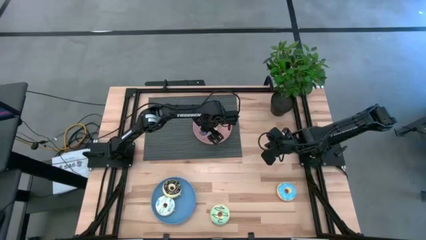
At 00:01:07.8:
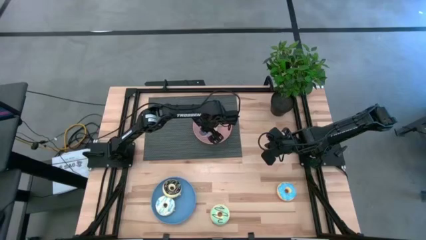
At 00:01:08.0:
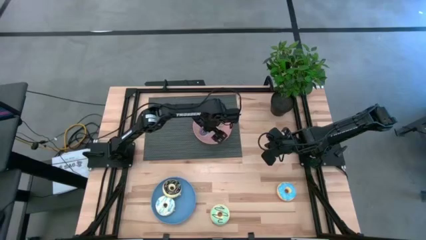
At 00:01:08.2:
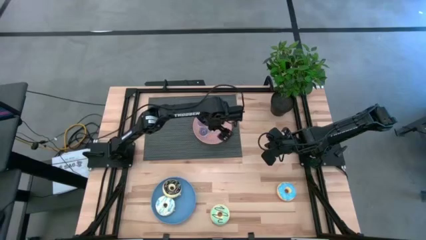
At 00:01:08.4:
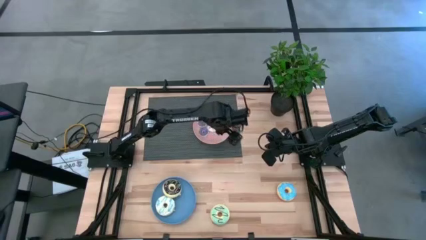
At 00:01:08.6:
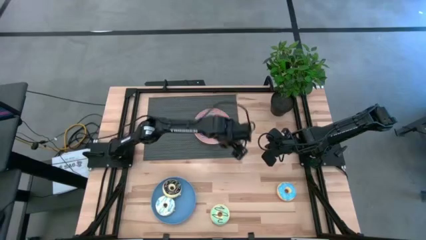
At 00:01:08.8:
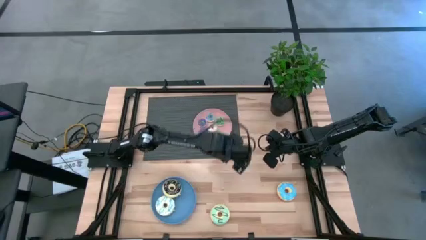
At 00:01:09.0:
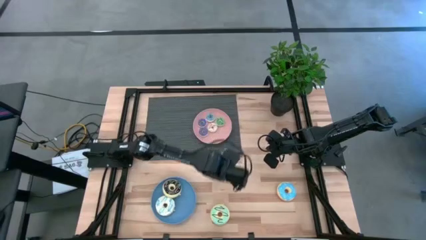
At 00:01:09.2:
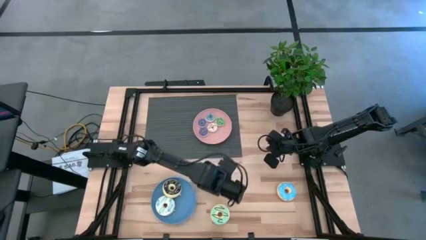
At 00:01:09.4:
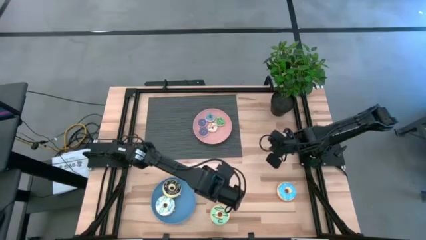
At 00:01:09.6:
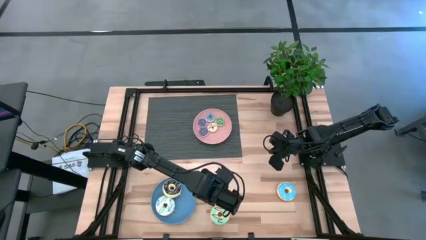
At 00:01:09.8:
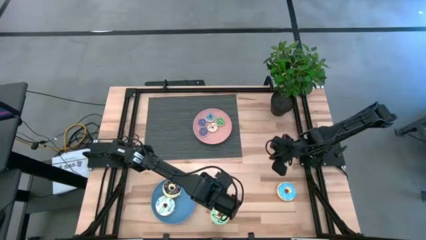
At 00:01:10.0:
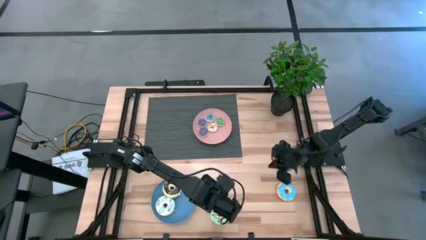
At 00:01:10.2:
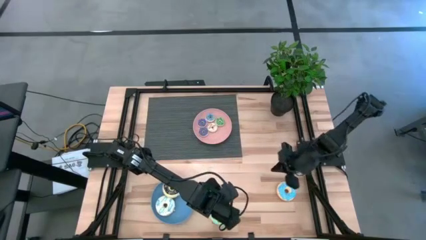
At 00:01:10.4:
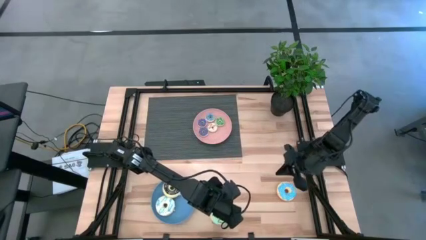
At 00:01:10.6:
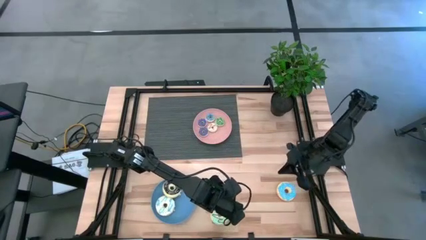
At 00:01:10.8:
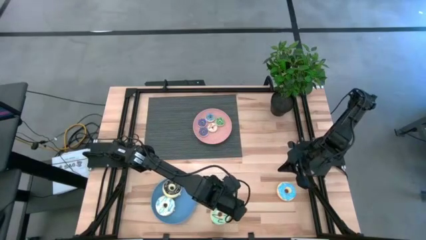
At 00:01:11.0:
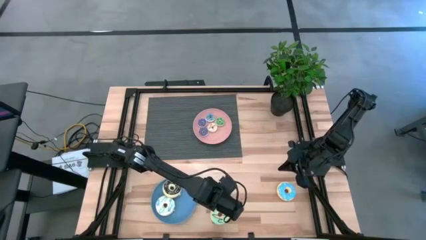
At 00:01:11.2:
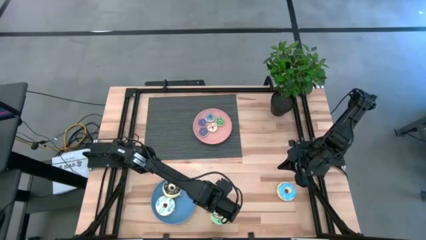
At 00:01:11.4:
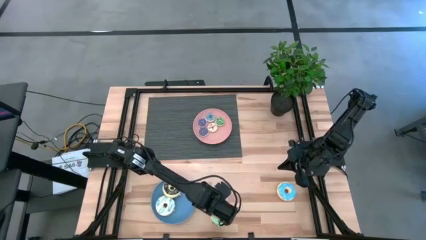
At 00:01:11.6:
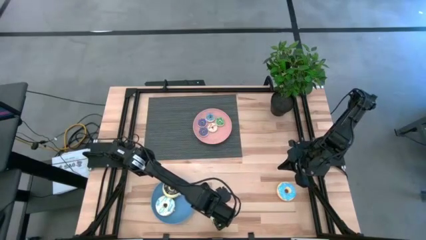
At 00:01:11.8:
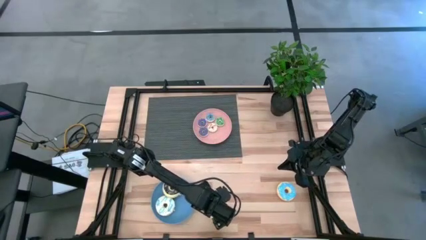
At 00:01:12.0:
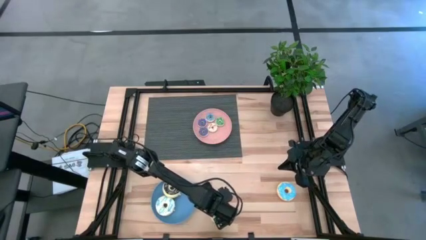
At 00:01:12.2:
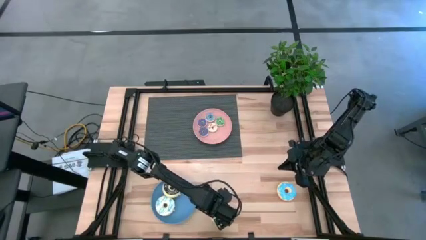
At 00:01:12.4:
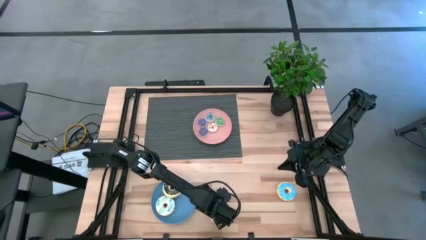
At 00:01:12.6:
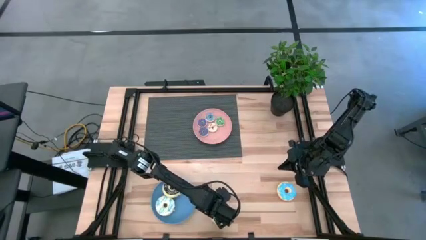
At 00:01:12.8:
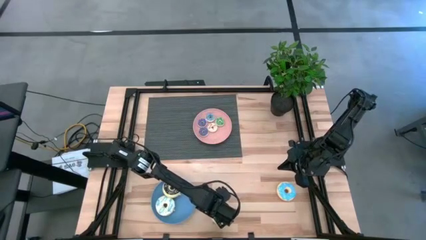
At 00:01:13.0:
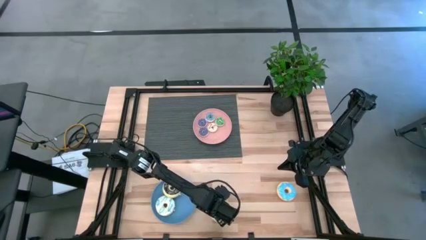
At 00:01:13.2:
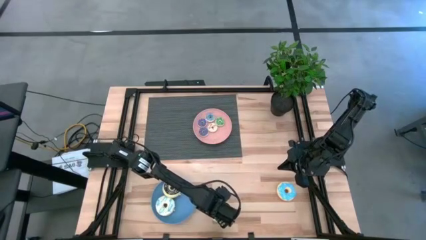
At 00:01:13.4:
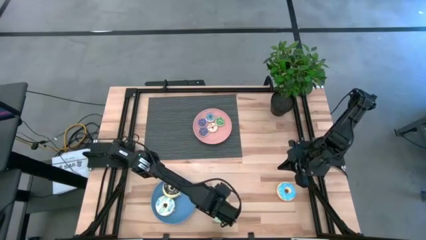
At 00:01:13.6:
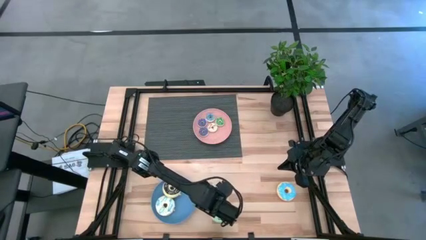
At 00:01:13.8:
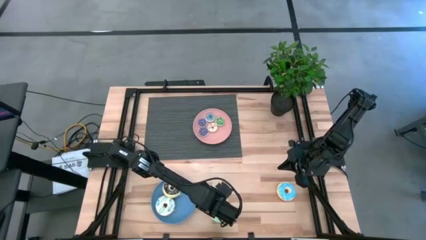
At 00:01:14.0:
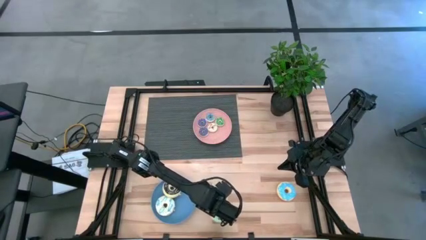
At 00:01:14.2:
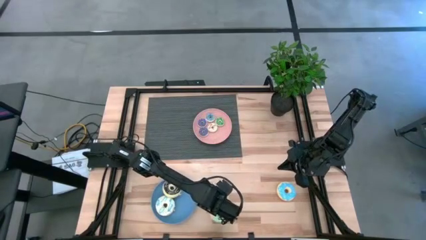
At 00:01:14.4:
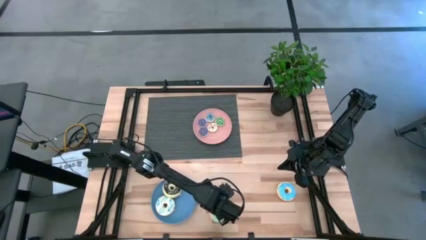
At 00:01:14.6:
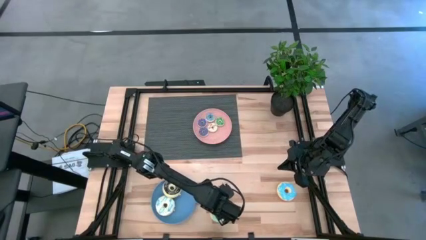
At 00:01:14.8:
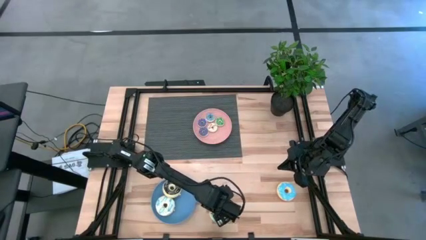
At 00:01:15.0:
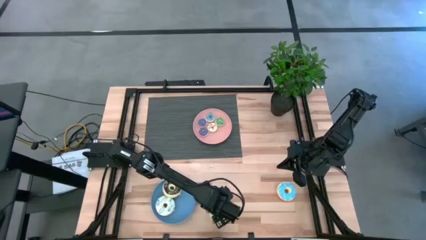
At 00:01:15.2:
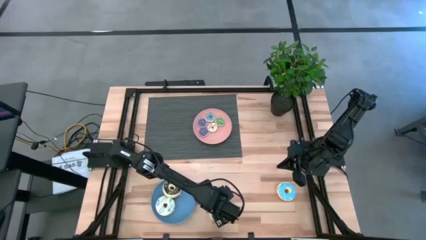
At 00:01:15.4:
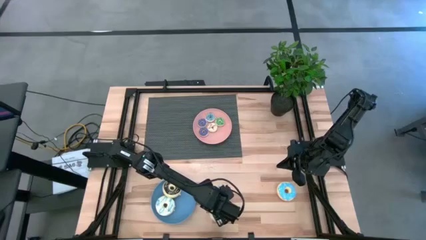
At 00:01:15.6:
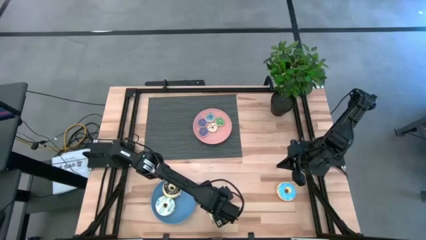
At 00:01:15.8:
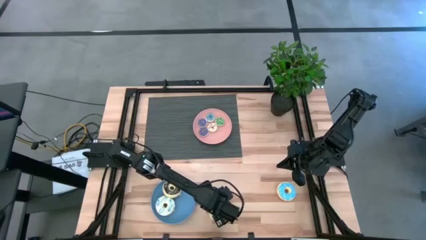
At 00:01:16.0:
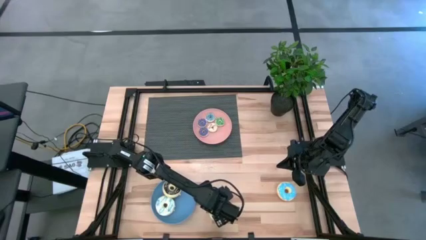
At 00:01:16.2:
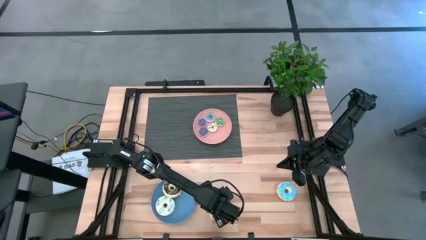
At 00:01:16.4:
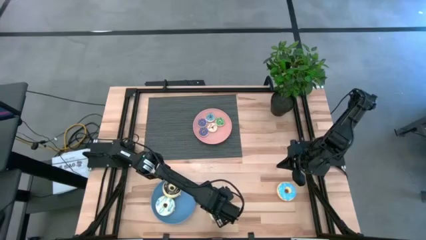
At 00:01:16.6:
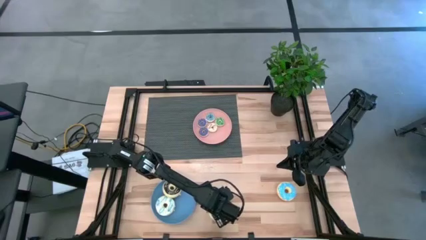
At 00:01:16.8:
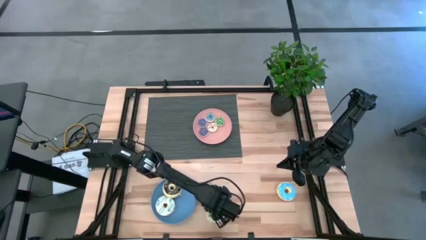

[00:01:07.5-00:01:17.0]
Task: Pick & Place donuts
Put the big light green donut on the blue plate

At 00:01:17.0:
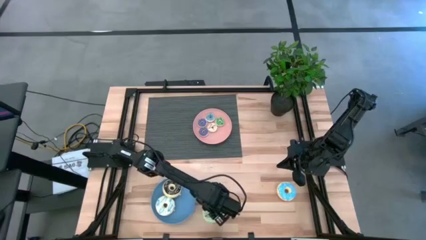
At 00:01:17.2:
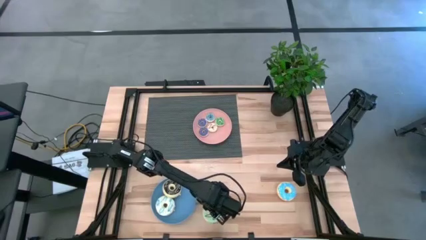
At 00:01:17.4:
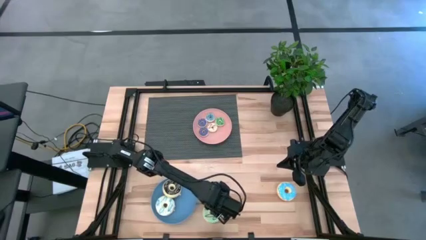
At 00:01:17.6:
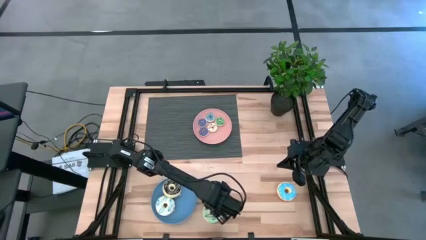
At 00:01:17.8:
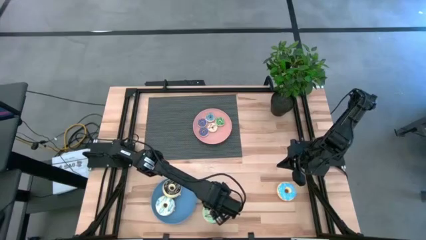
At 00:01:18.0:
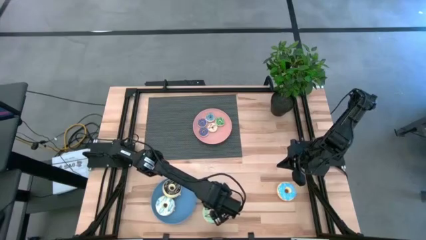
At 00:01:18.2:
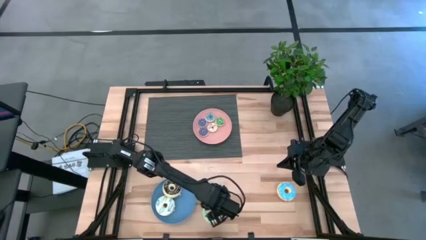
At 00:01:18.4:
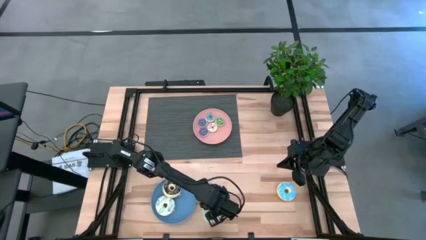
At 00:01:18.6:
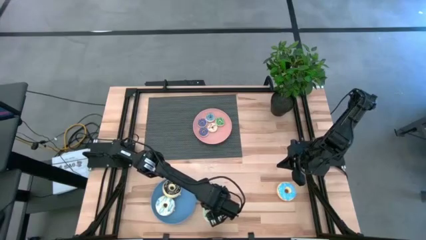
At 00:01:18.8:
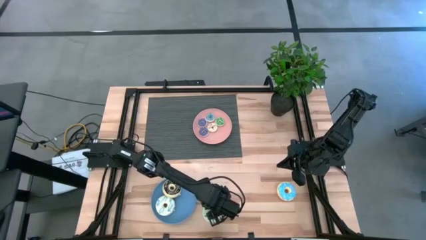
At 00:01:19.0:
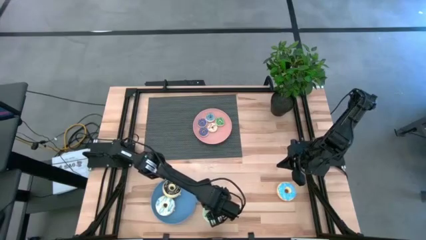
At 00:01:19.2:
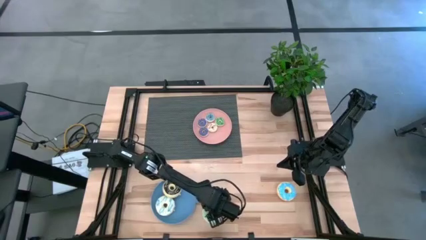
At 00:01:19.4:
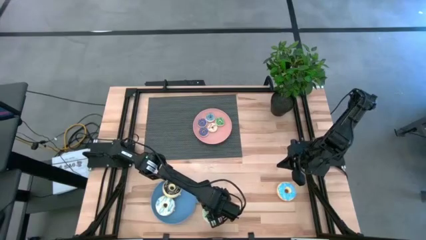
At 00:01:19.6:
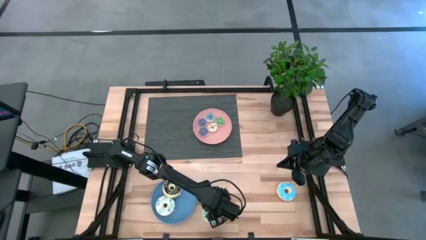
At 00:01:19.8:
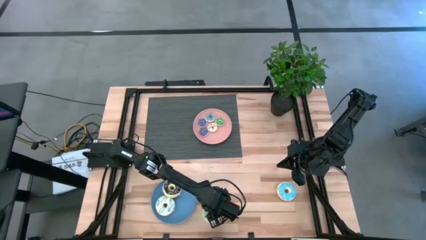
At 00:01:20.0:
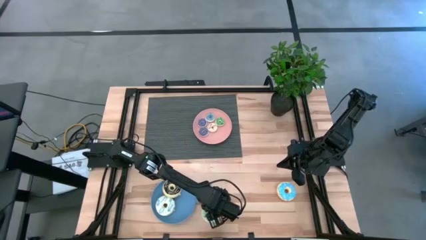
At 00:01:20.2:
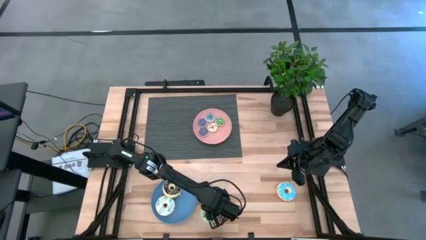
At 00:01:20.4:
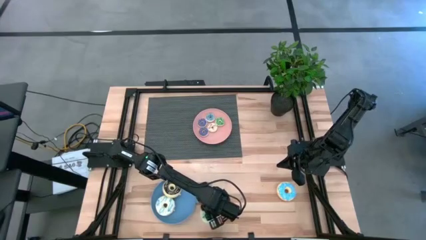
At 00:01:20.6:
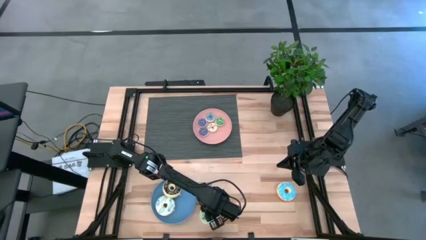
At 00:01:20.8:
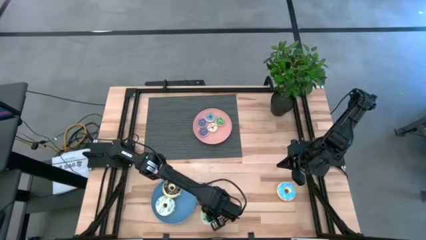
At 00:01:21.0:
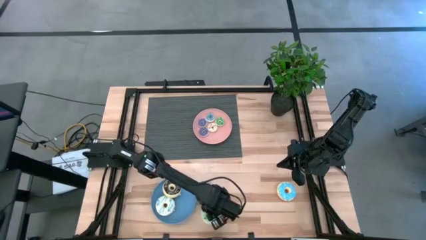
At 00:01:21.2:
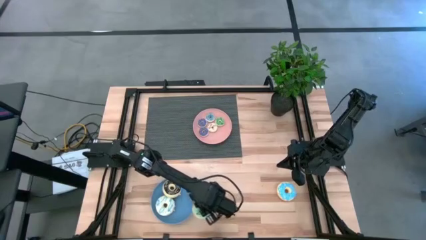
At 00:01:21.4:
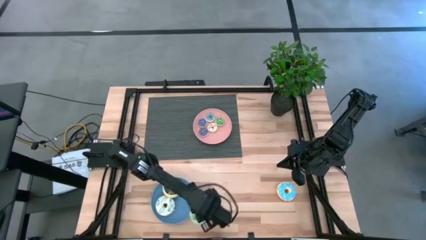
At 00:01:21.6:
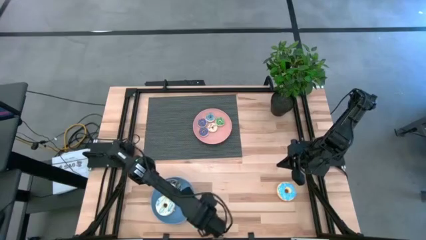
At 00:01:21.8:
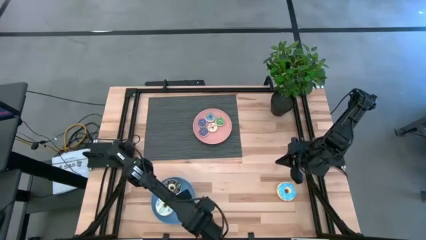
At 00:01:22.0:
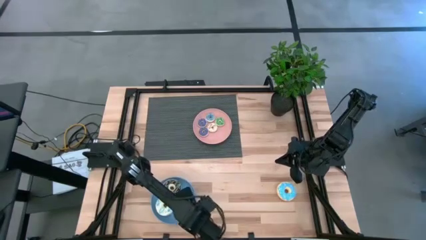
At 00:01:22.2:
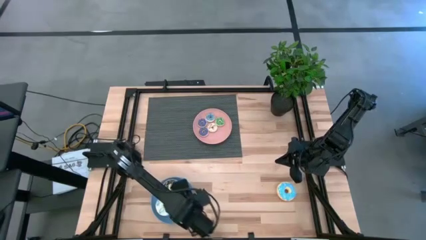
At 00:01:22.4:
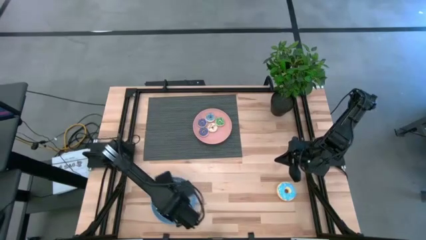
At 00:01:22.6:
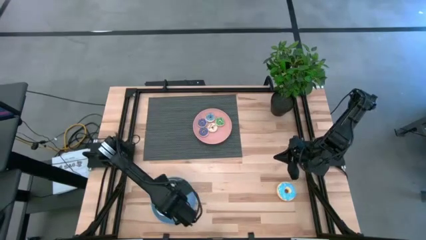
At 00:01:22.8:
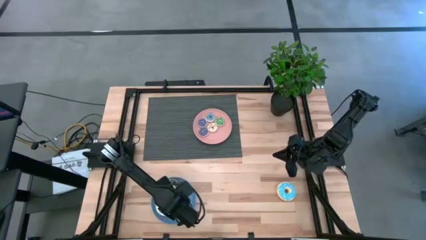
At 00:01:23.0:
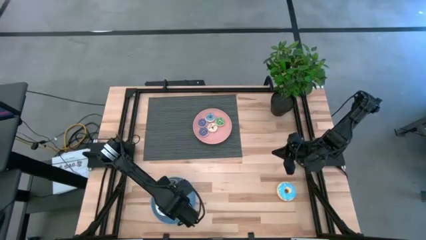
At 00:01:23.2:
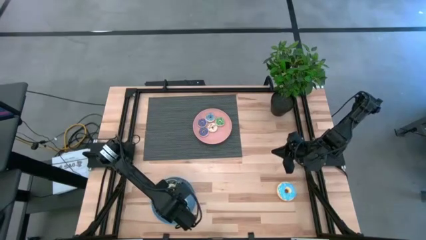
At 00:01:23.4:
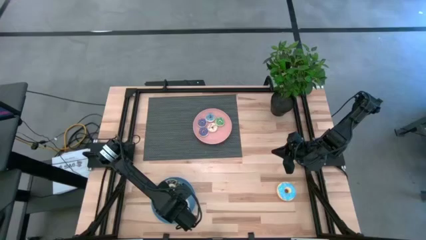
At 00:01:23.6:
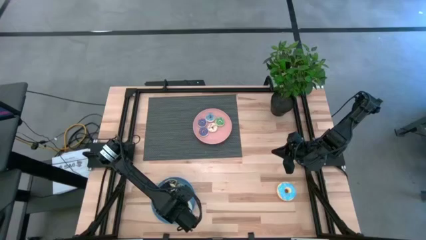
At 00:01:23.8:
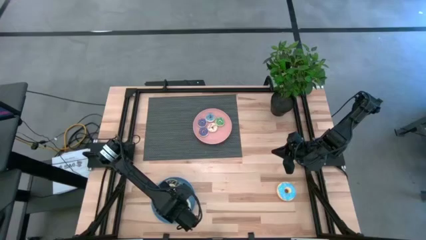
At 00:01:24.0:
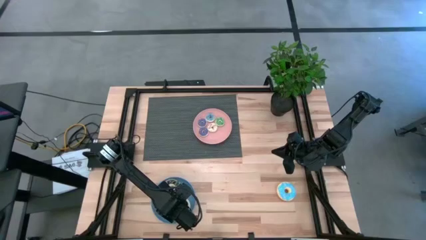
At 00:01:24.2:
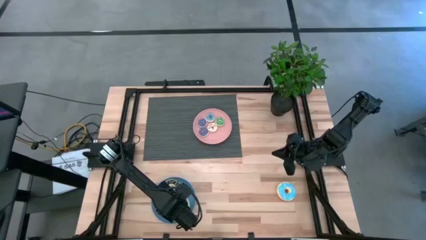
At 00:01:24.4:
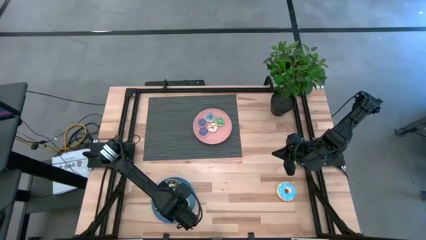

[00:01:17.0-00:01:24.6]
Put the big light green donut on the blue plate
